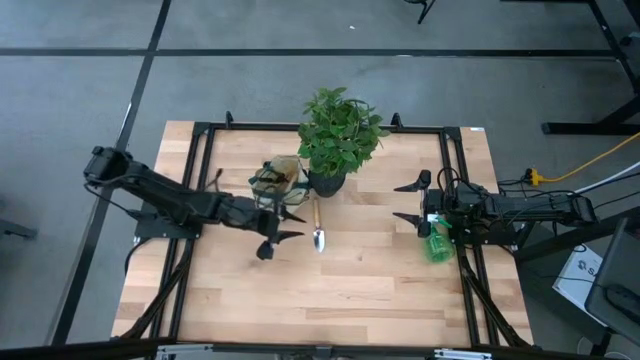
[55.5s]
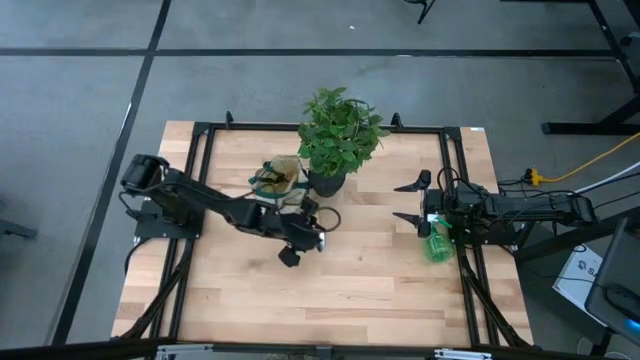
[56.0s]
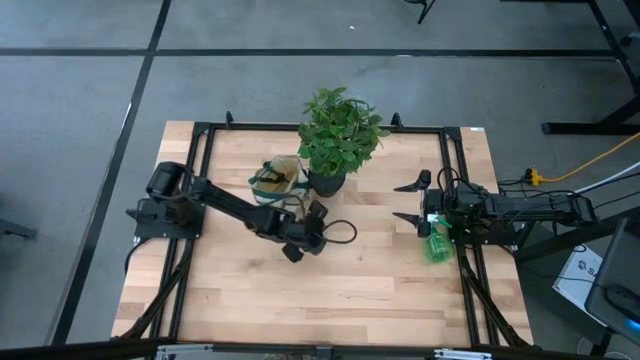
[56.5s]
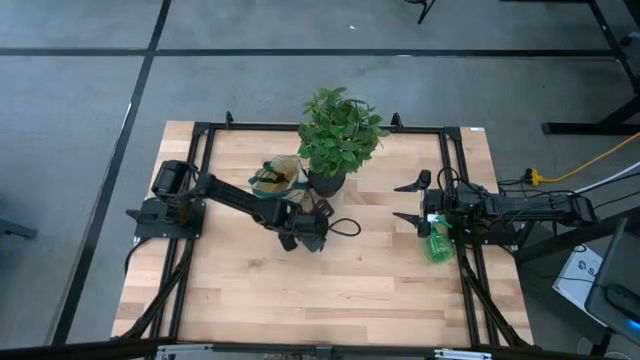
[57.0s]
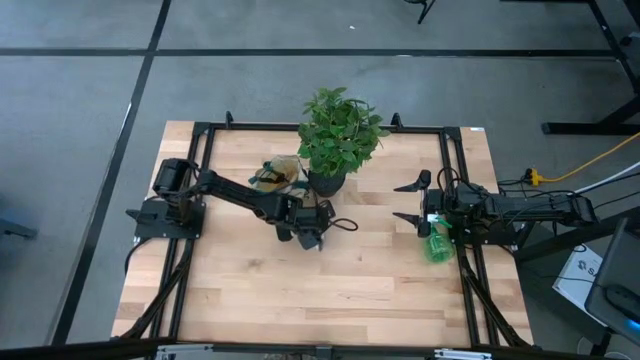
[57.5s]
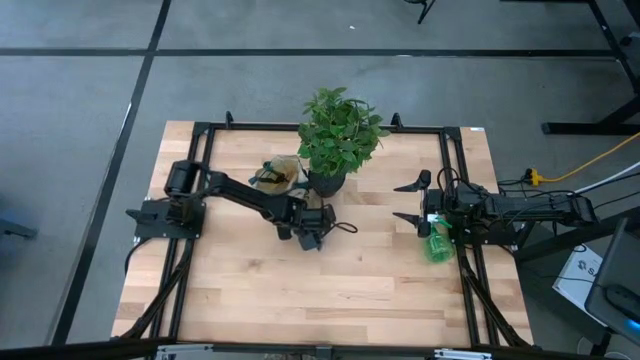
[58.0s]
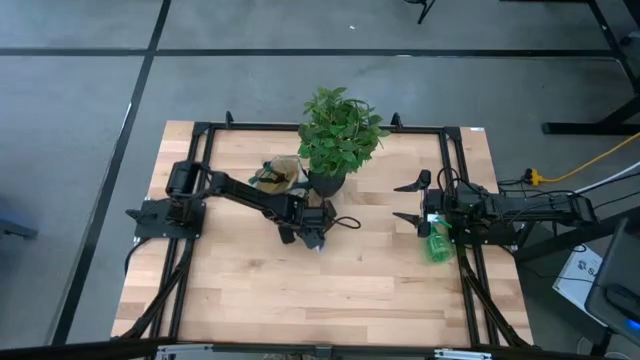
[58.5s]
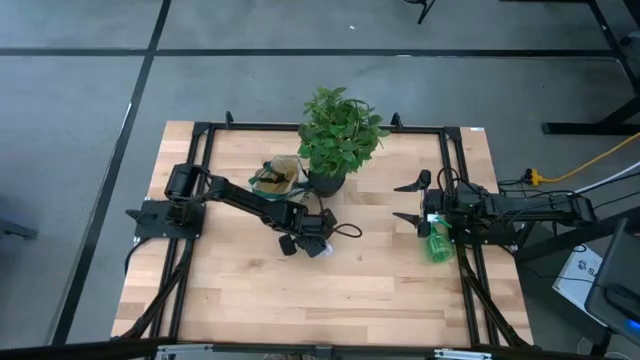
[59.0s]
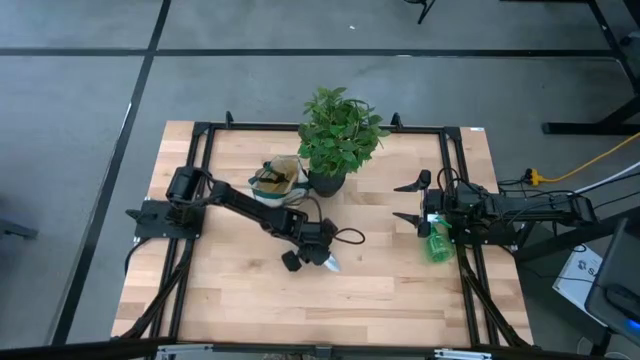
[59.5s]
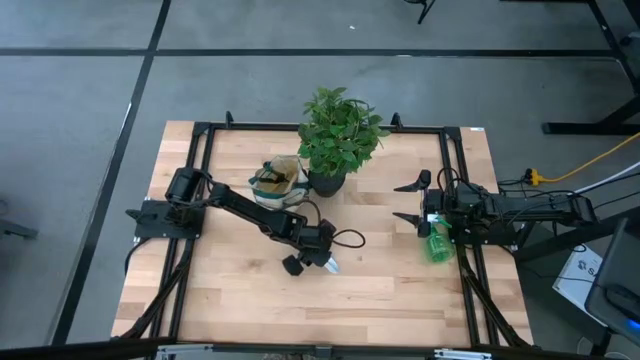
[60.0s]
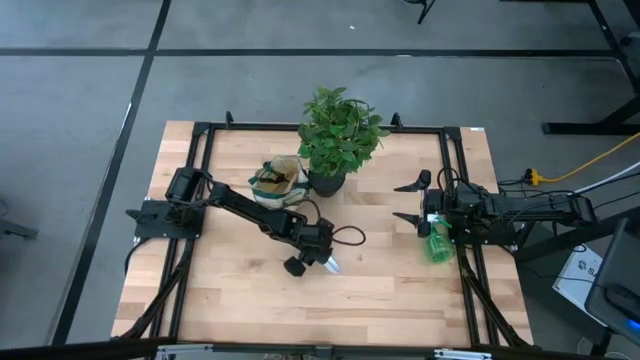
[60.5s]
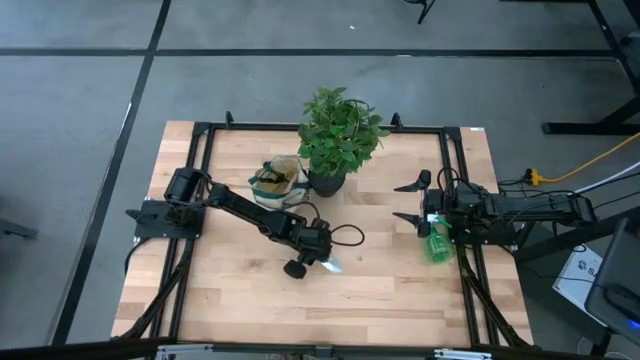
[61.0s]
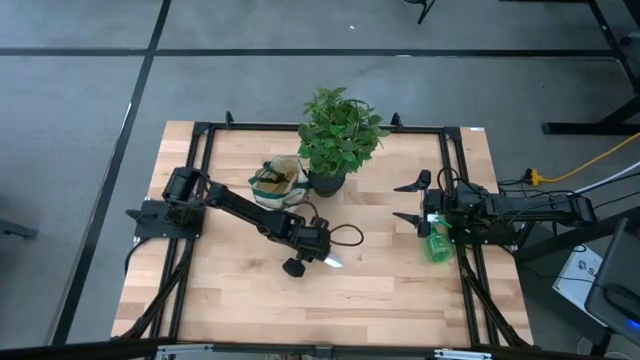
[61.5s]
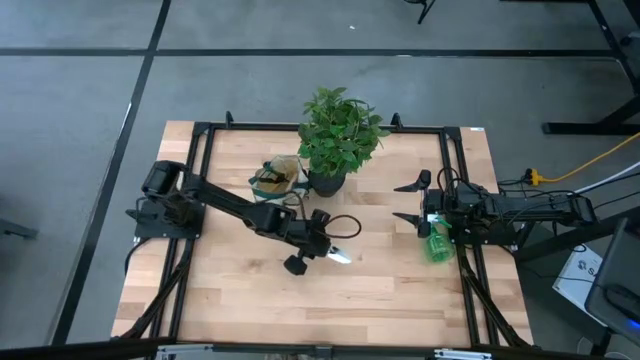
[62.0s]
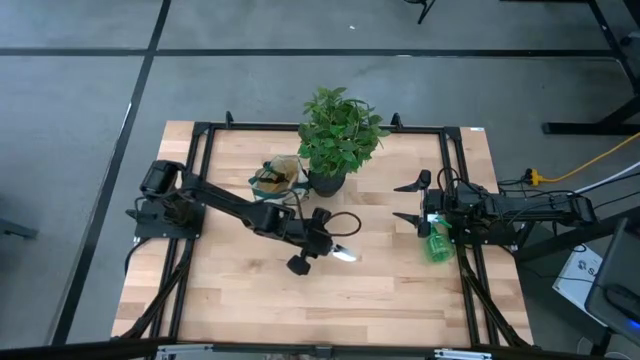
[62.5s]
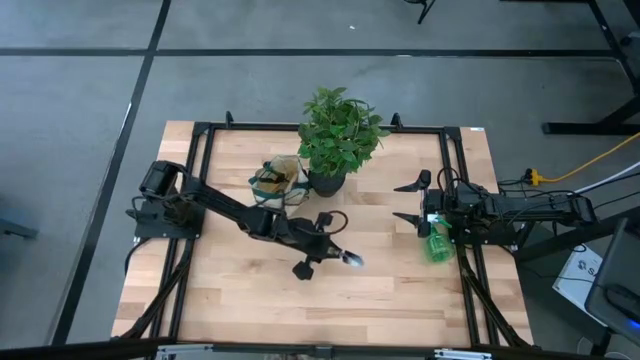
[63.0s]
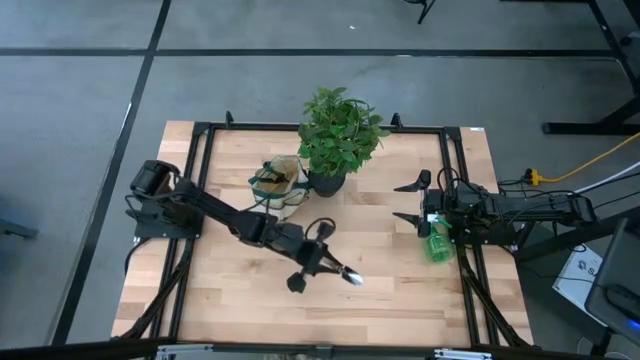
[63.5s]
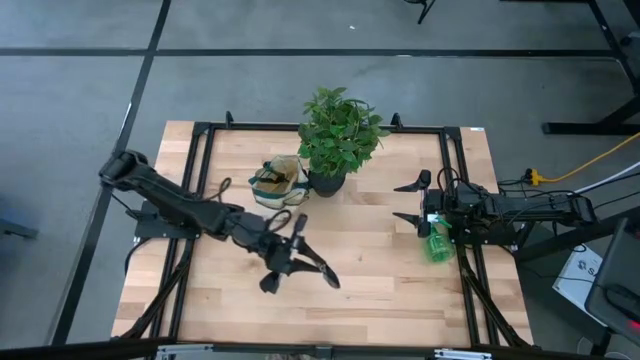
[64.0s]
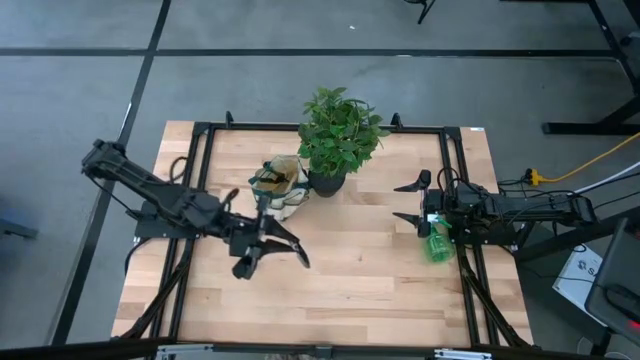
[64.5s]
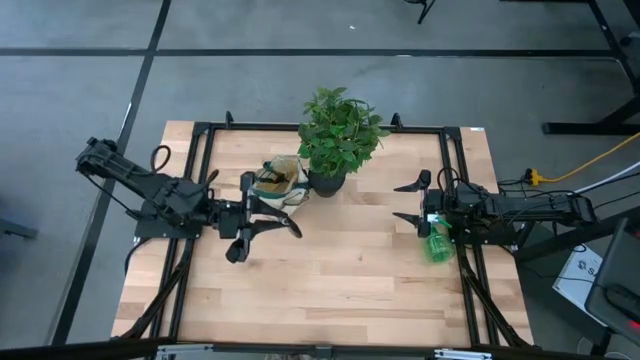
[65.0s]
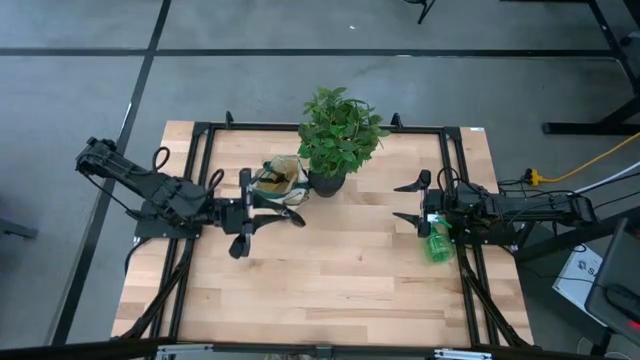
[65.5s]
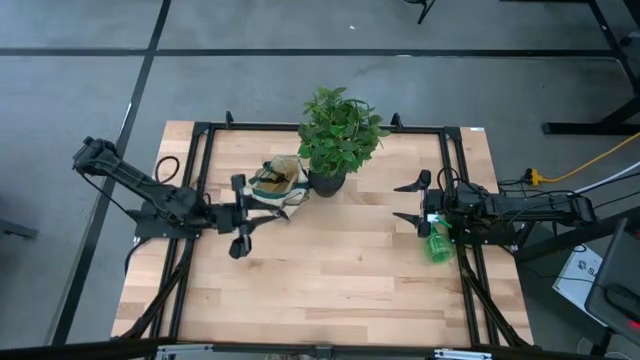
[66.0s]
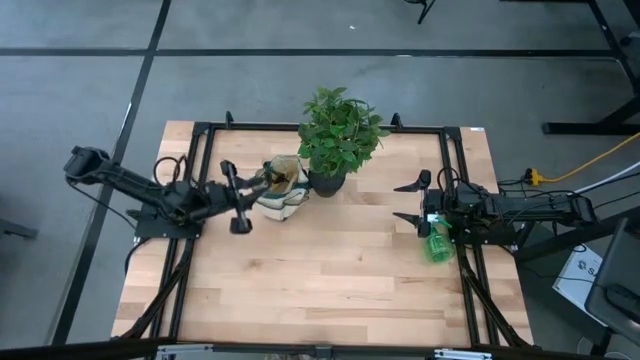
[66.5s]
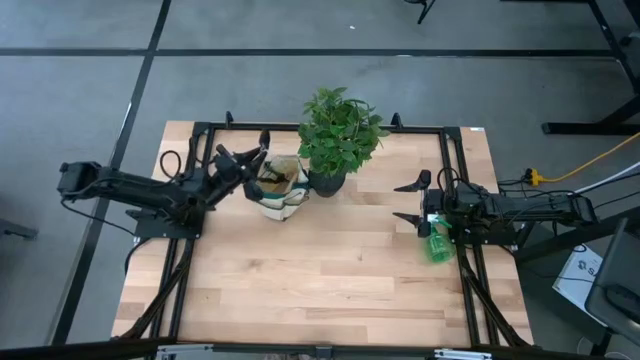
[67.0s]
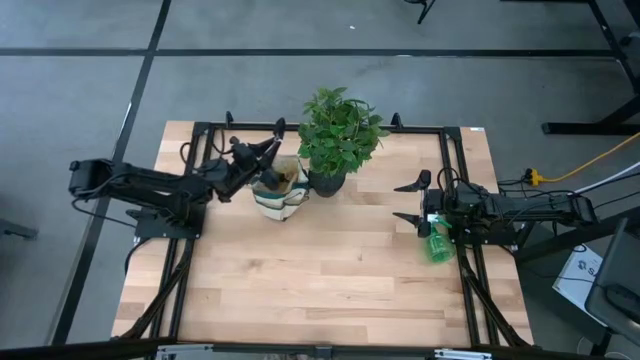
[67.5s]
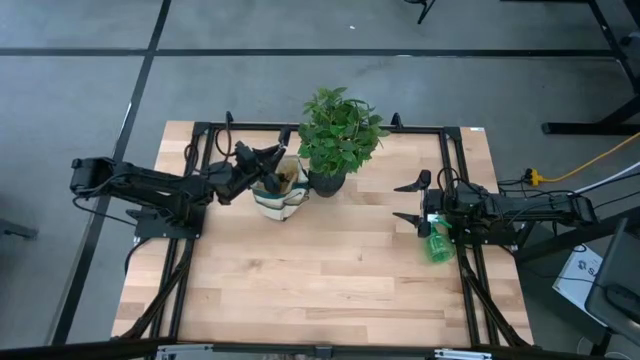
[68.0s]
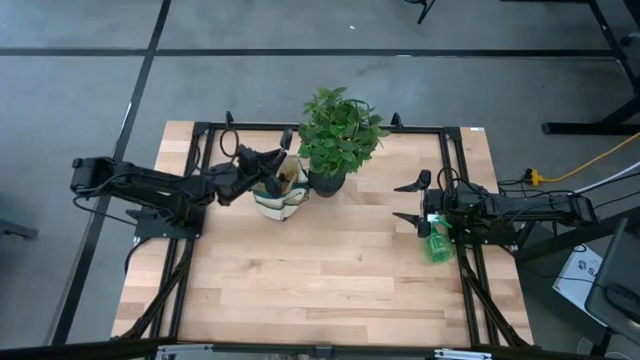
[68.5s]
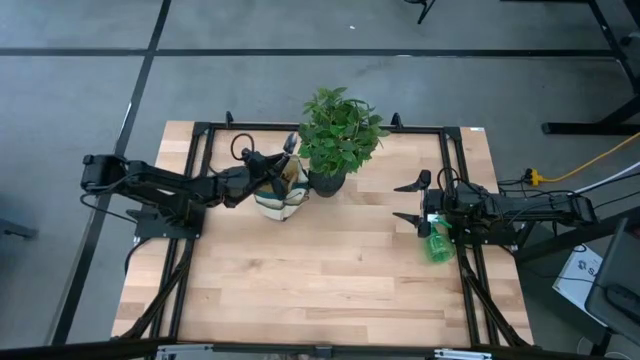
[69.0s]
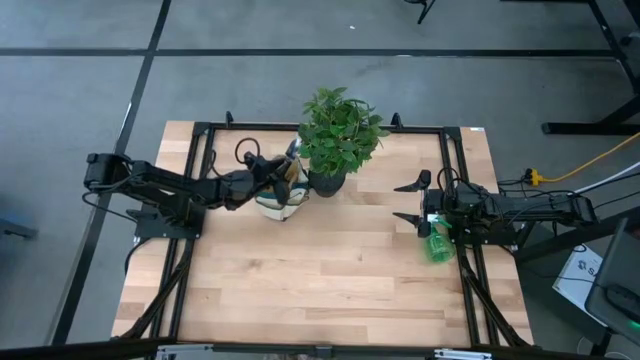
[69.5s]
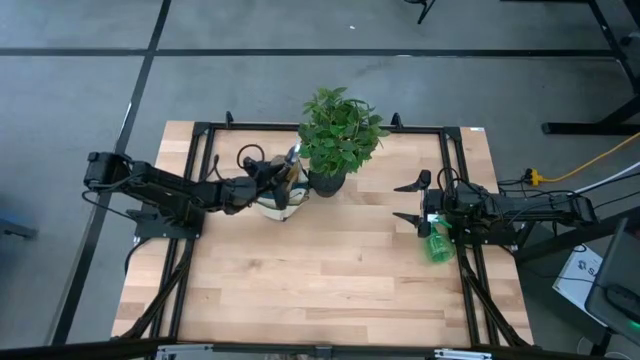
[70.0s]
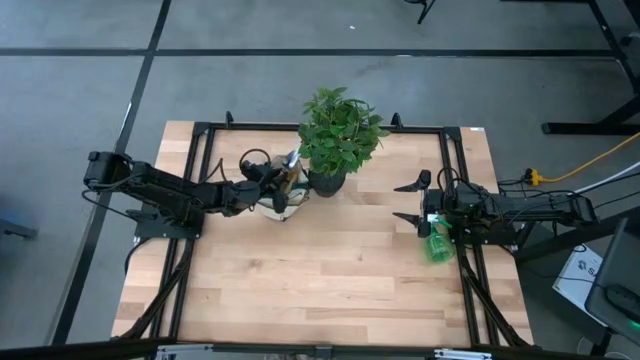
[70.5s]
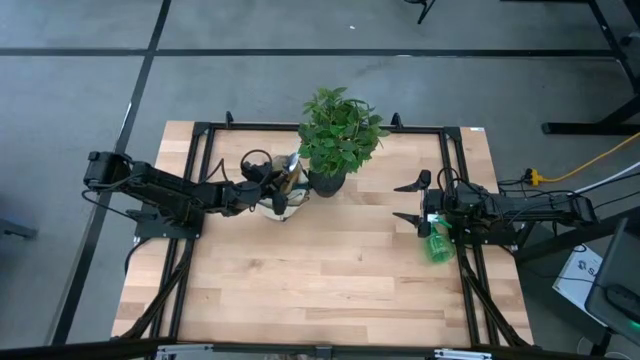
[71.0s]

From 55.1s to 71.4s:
Task: Pick & Place Garden tools in Gardening bag
Put the brown trowel into the white bag

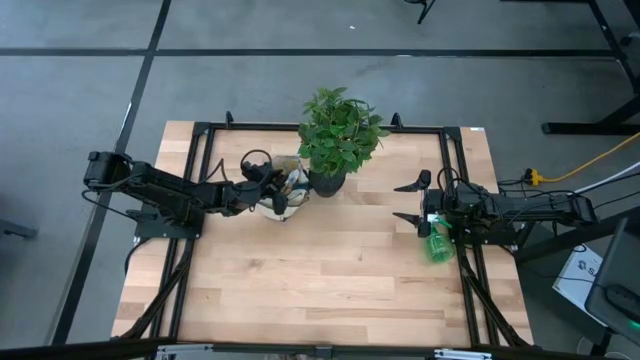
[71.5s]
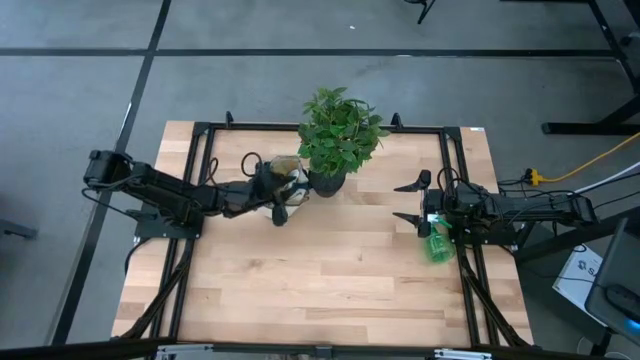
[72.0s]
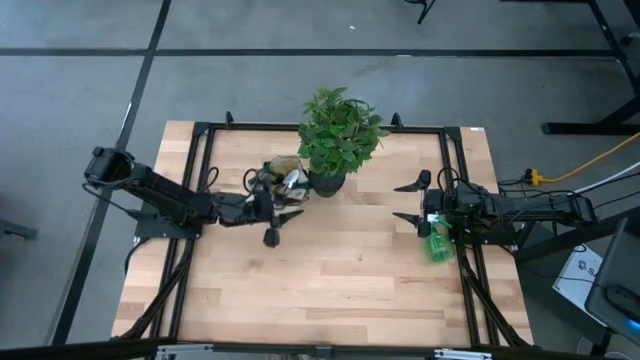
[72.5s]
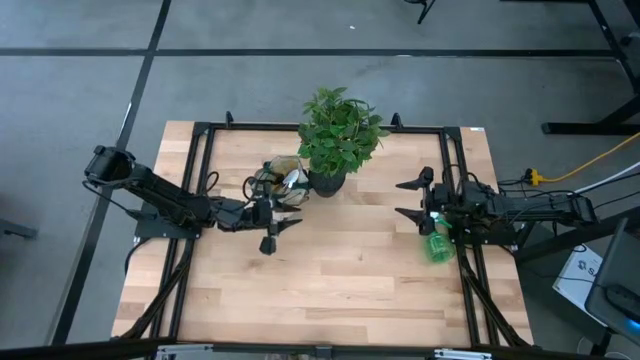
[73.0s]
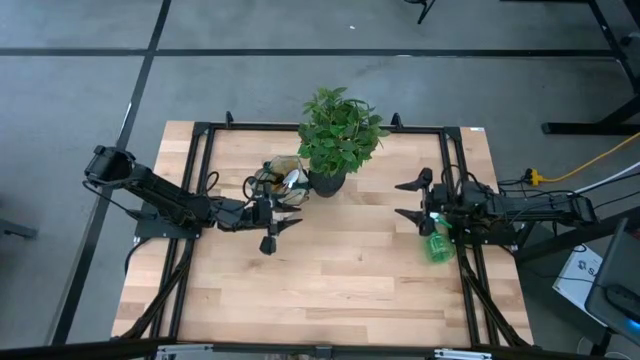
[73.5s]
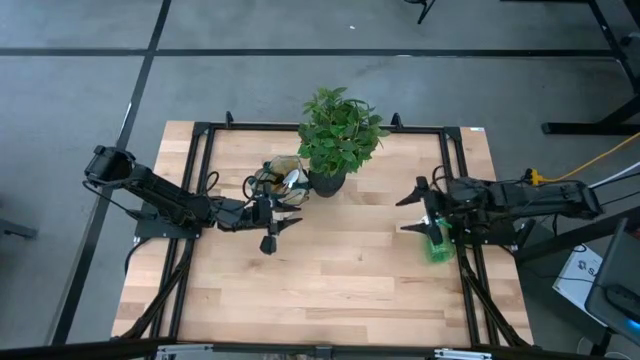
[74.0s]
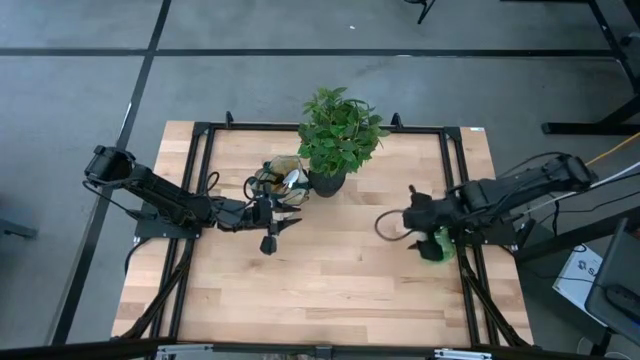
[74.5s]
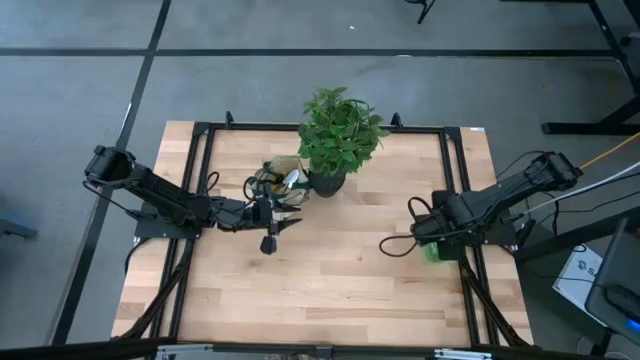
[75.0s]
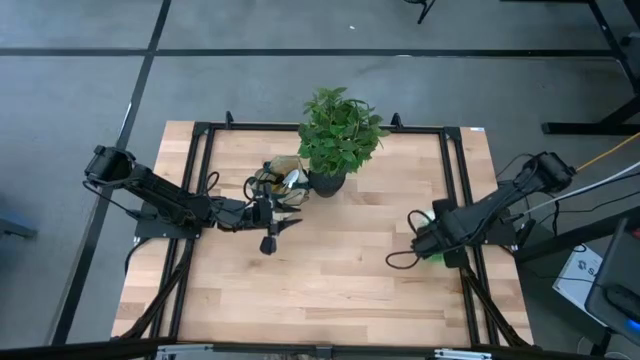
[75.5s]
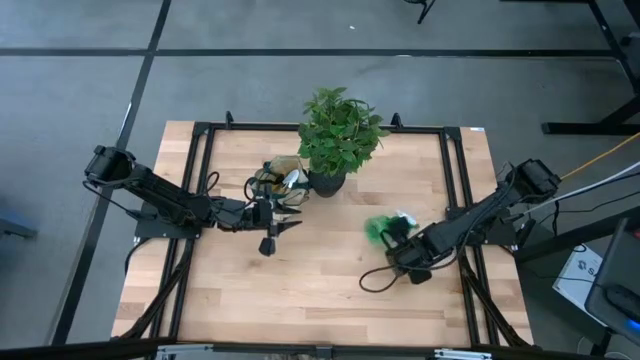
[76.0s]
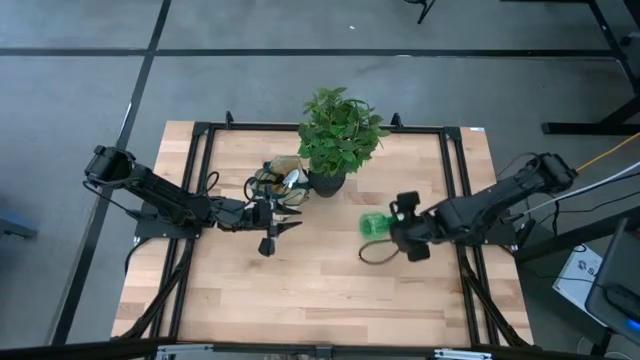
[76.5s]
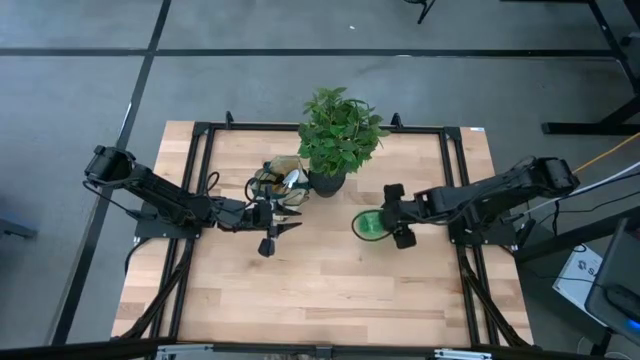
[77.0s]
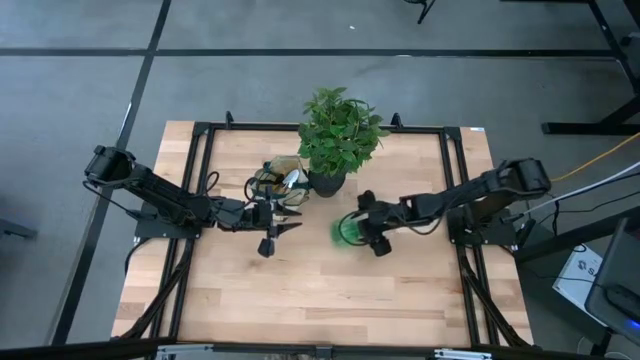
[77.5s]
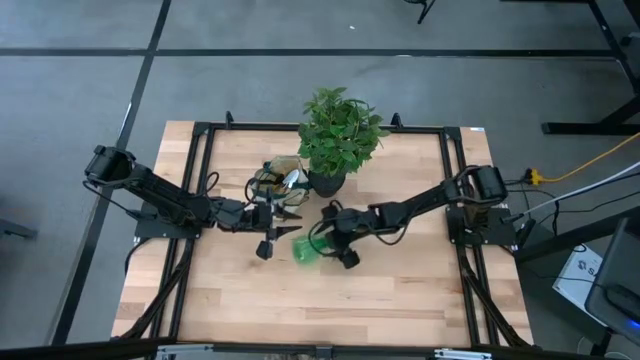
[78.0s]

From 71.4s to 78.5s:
Move the green spray bottle to the center of the table
